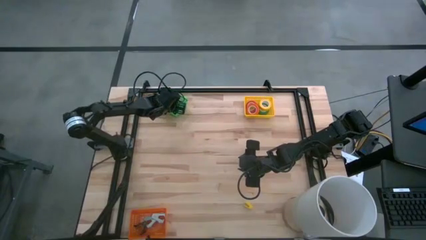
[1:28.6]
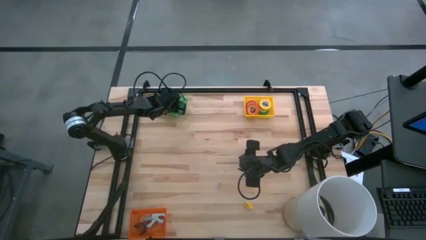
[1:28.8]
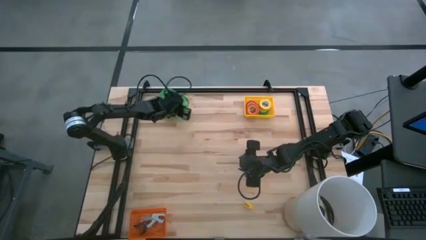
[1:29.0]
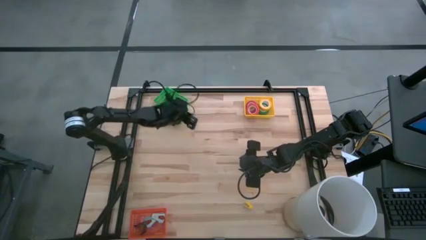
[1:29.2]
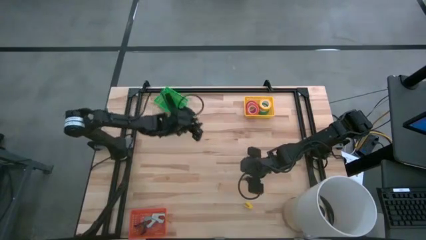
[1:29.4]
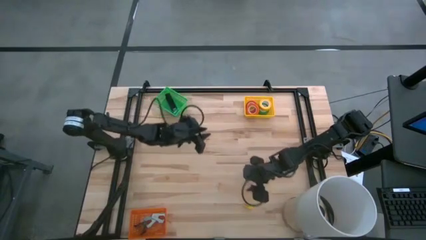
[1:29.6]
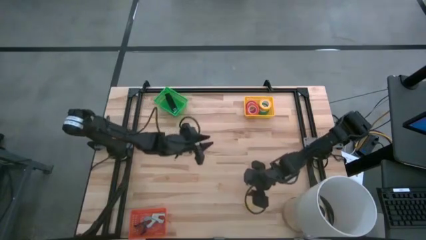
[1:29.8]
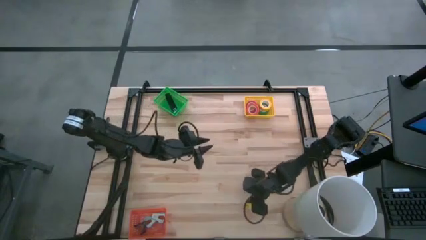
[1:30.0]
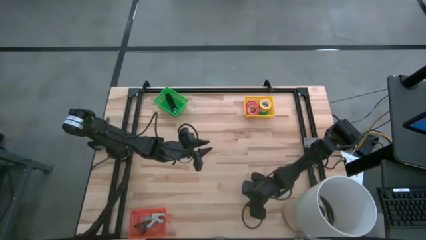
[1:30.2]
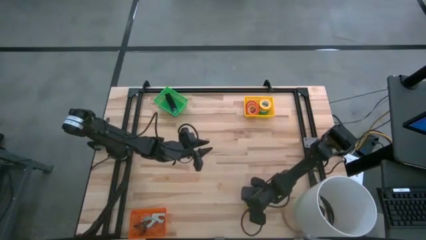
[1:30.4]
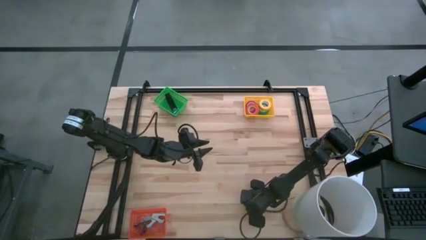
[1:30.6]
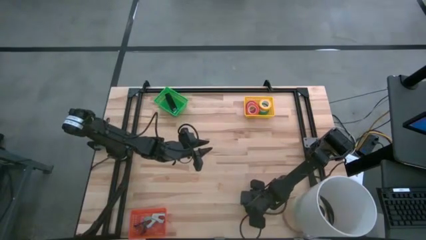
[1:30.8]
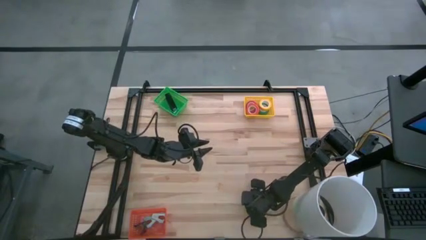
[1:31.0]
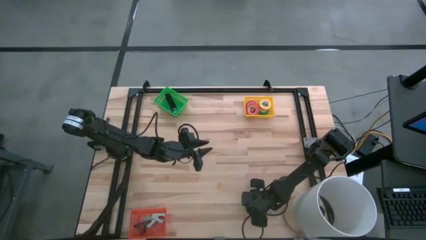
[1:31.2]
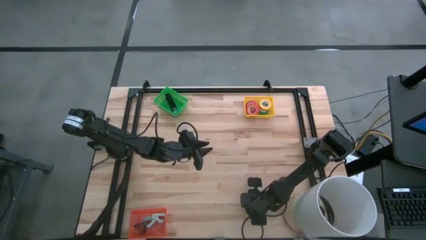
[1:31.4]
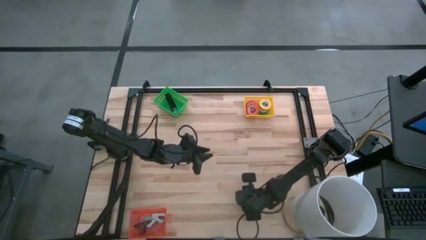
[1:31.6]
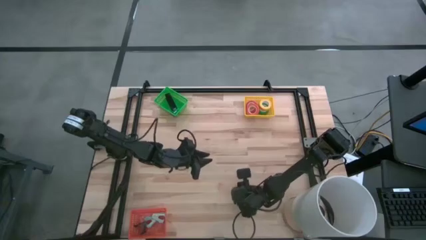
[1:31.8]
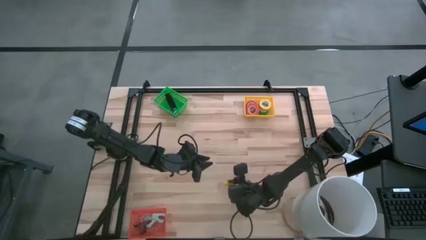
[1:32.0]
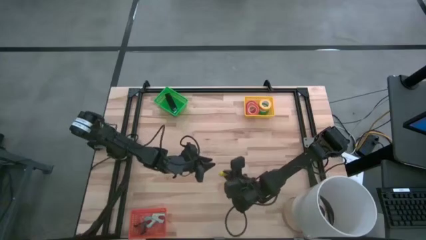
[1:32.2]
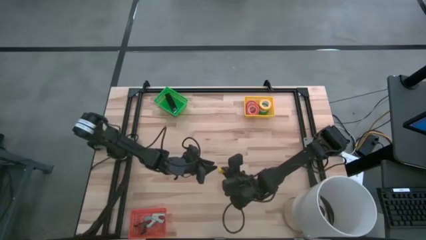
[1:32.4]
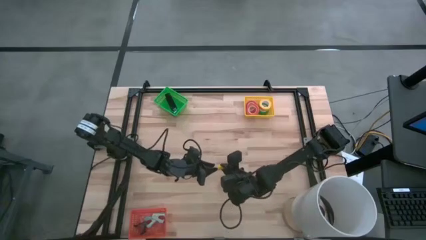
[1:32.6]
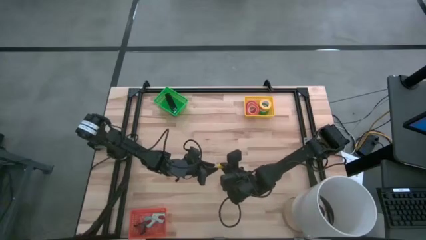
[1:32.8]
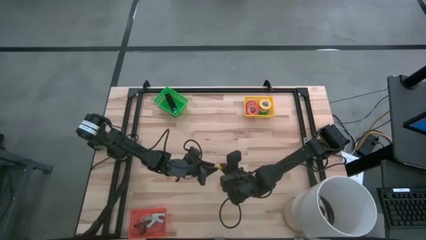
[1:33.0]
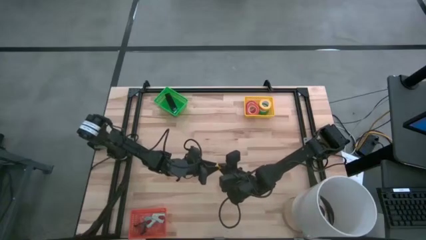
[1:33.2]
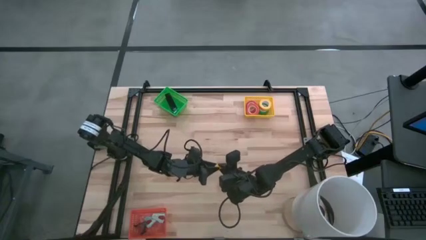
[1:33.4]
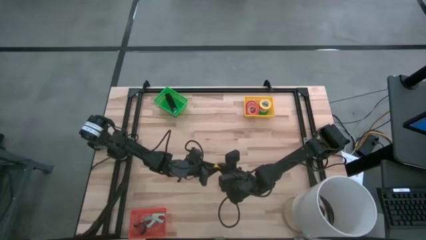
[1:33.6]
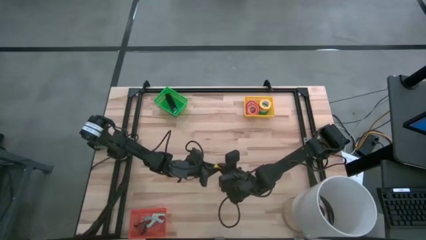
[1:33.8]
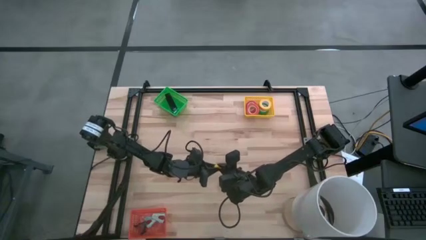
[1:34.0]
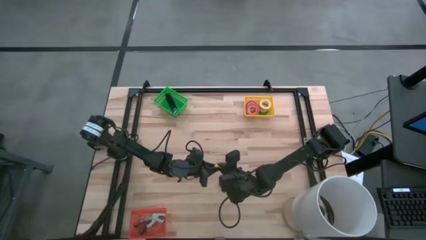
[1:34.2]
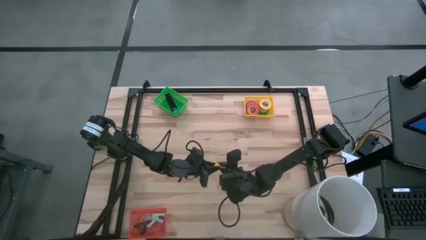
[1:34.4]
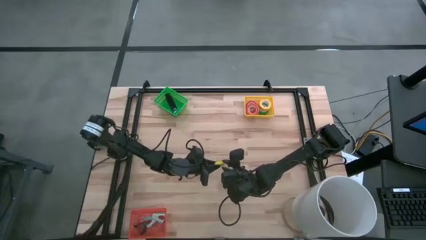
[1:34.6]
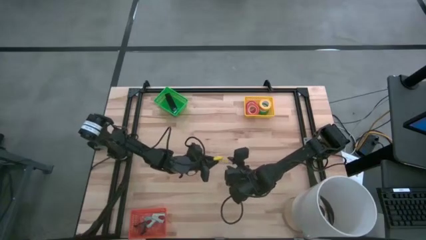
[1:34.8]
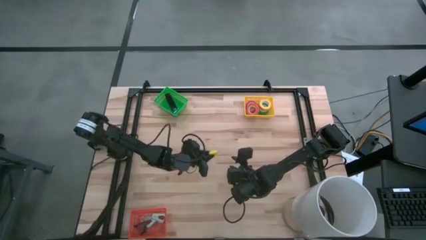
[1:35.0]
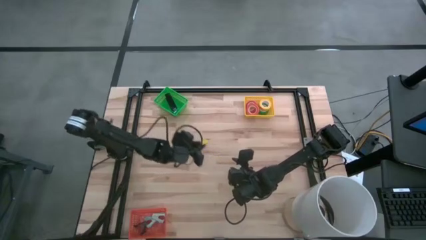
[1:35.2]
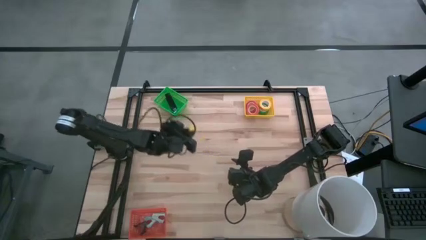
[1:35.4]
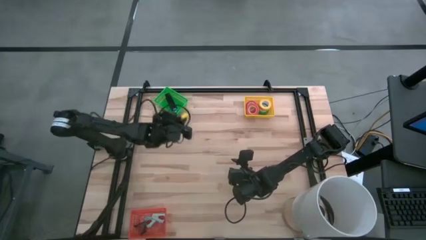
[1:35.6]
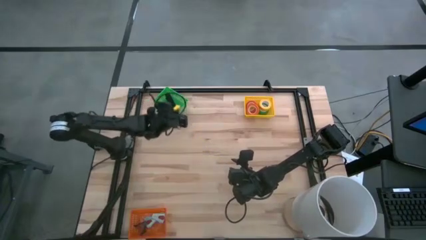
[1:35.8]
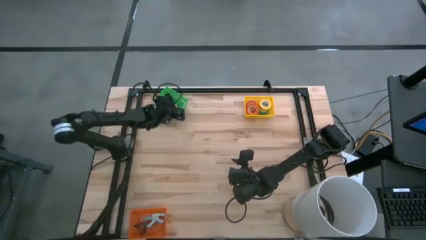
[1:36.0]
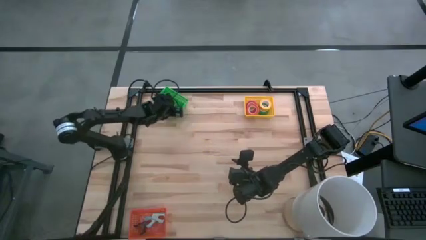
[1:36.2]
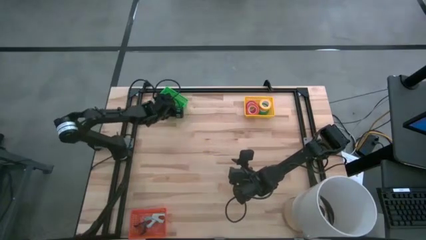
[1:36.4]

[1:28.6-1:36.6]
Task: Pick and place Stapler, Stapler remover, tape
Put the yellow stapler into the green bin

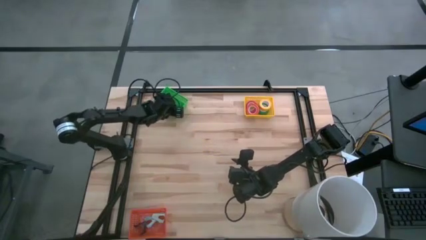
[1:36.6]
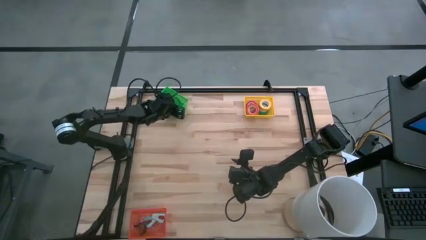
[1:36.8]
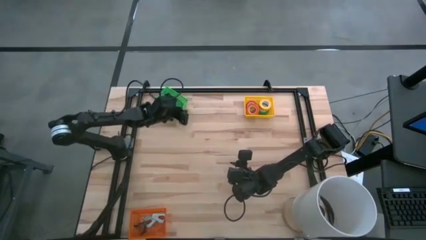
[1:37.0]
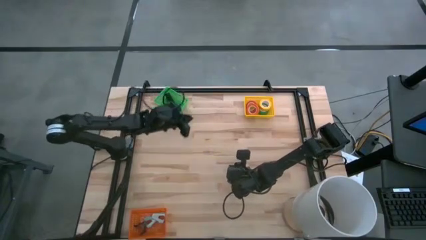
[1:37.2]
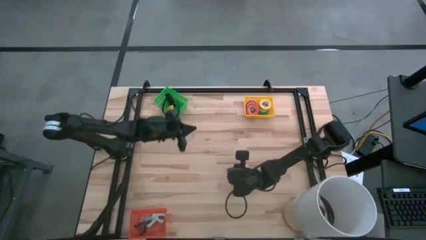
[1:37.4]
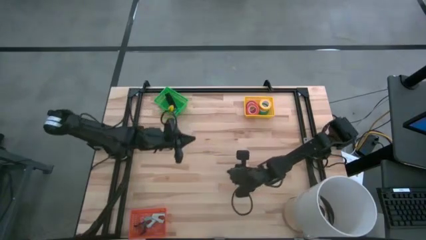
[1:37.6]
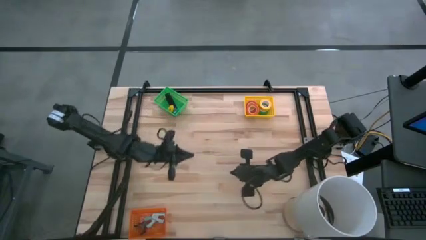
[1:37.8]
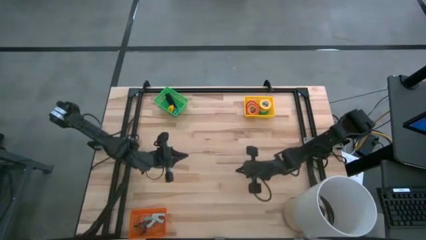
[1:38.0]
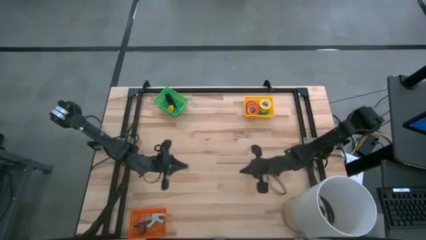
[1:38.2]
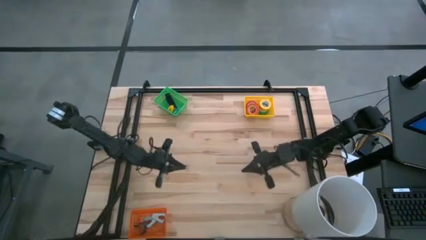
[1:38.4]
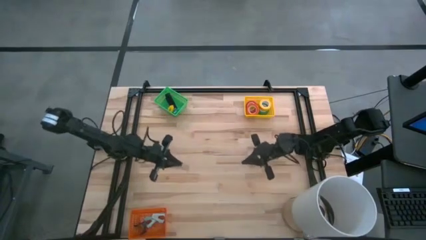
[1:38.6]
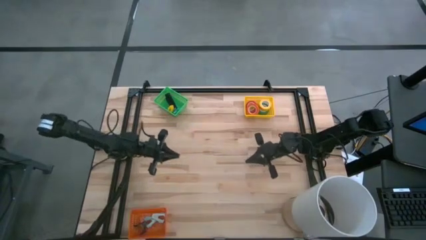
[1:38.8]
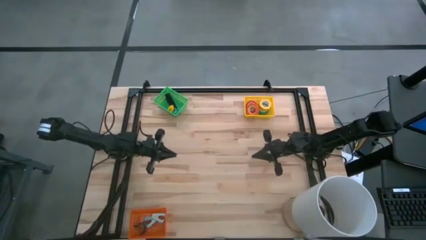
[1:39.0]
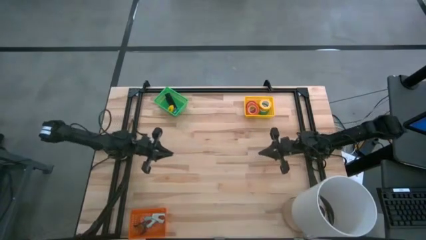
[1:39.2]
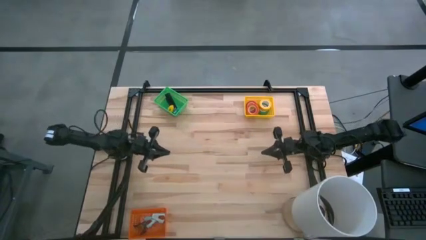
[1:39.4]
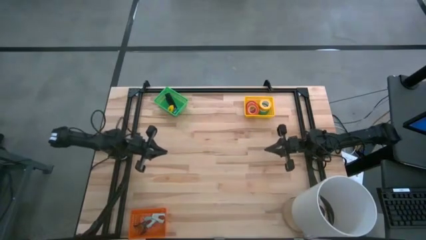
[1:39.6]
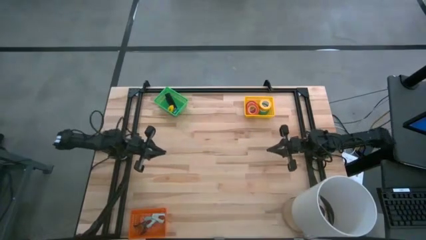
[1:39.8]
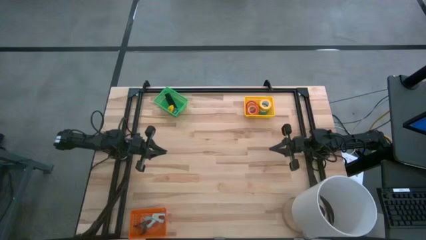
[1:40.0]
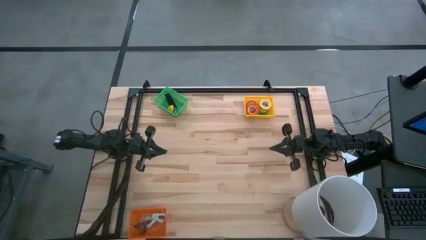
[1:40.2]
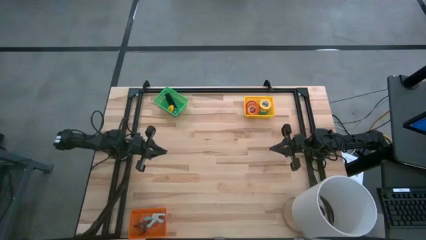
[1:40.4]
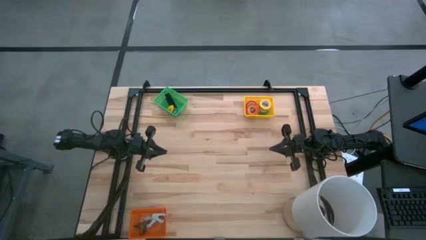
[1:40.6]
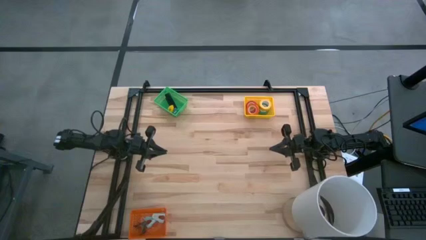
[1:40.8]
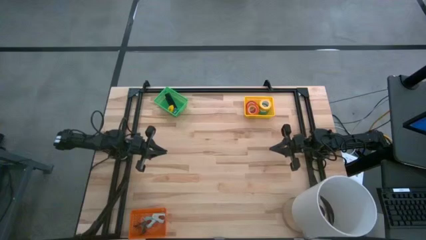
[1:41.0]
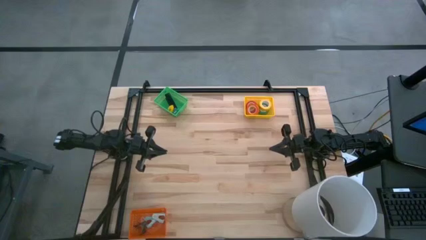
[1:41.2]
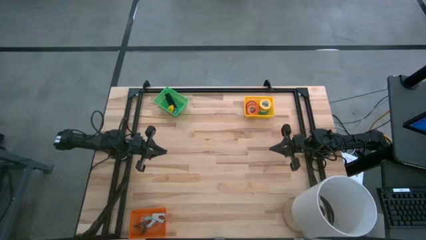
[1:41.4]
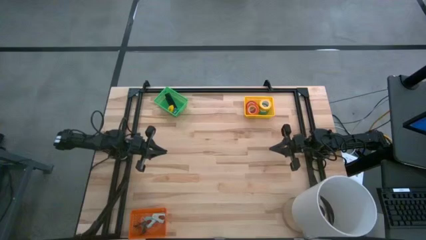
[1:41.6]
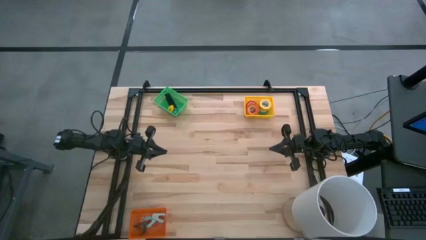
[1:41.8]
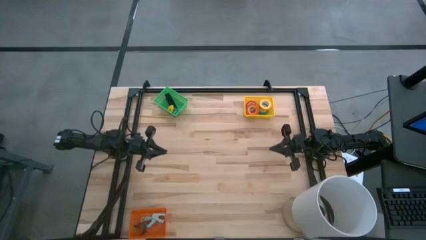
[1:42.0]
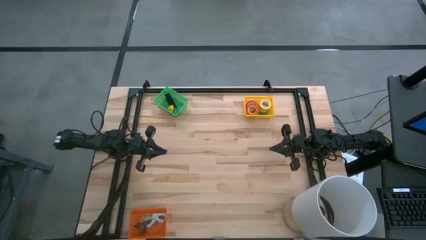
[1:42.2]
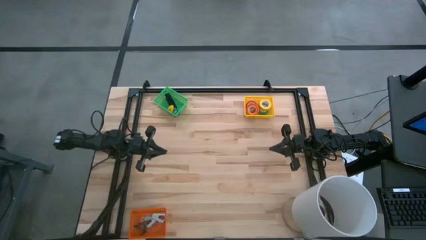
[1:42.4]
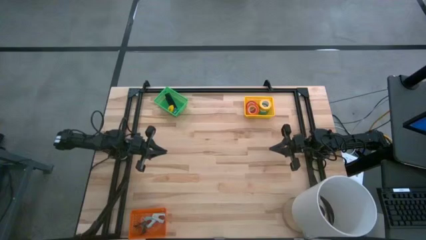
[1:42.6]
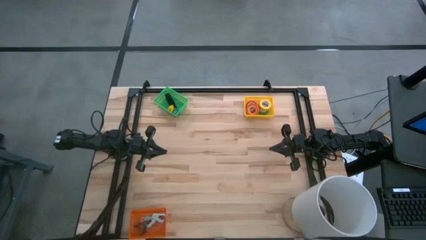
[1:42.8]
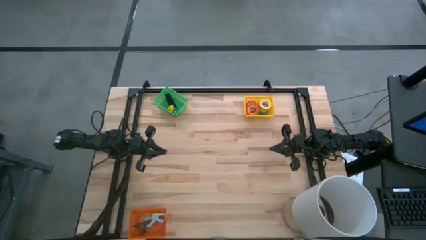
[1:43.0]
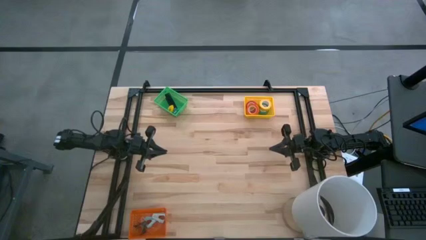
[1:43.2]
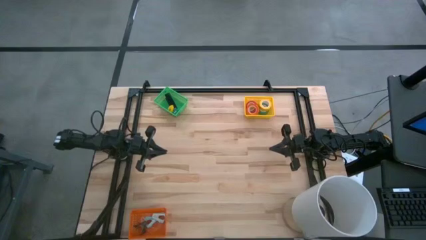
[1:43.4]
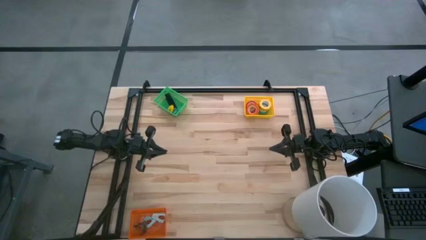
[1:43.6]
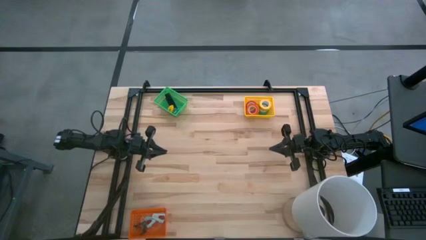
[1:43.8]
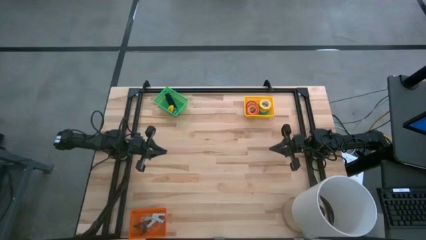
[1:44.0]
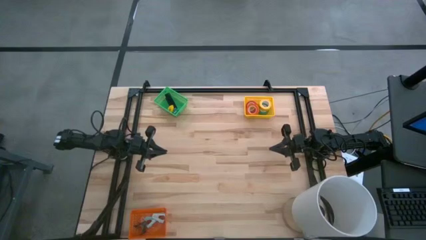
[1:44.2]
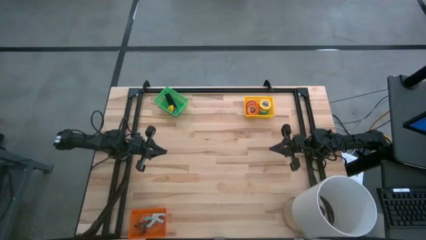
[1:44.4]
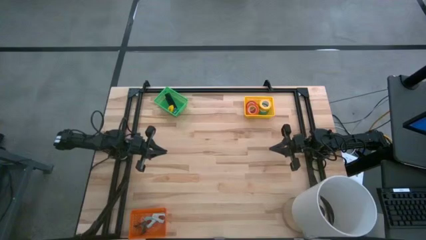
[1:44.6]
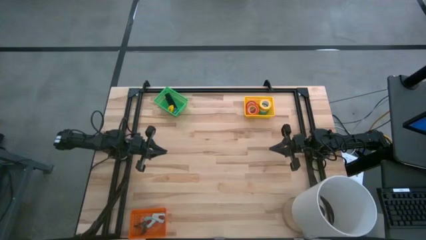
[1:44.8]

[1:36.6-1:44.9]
Return to Home Position
